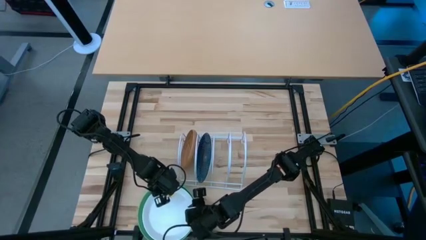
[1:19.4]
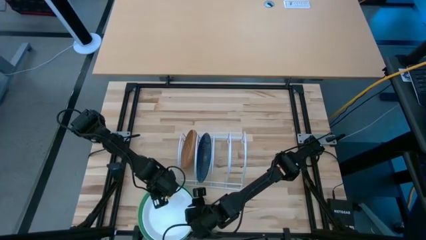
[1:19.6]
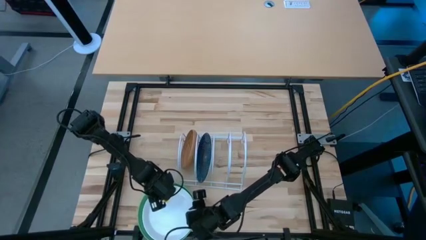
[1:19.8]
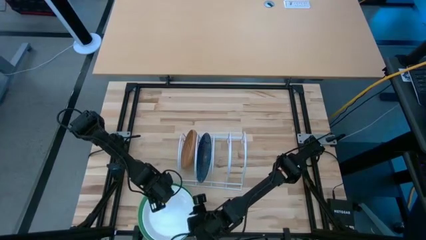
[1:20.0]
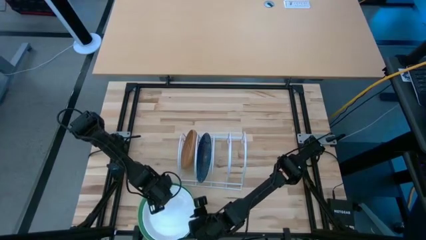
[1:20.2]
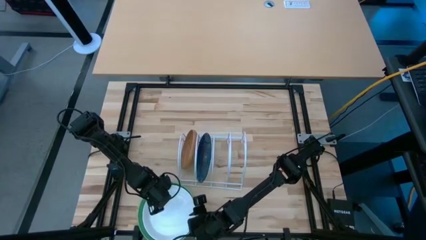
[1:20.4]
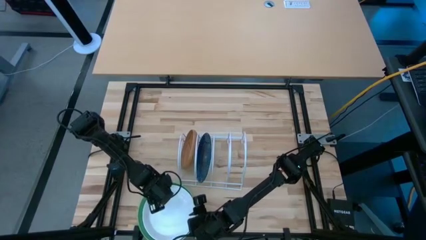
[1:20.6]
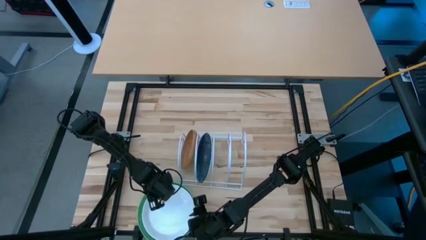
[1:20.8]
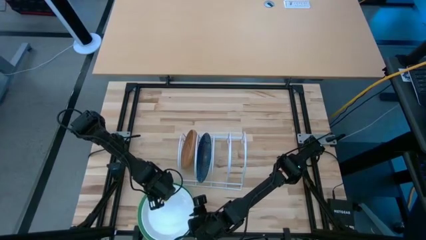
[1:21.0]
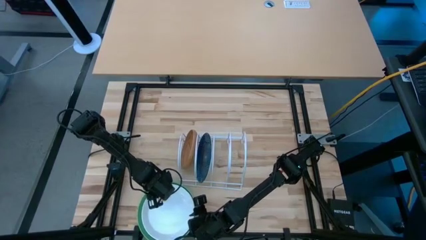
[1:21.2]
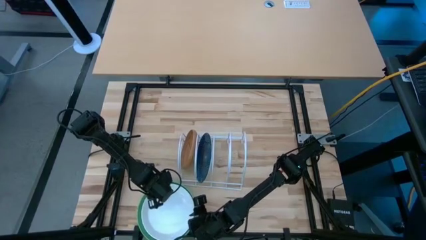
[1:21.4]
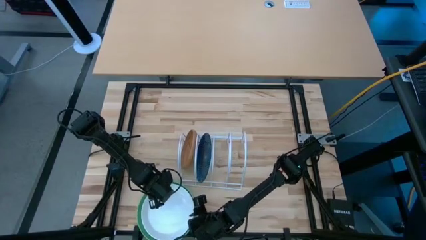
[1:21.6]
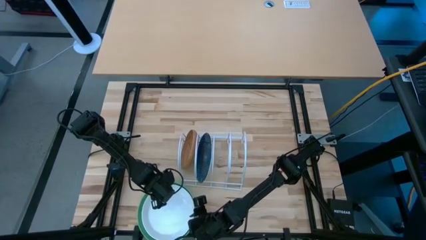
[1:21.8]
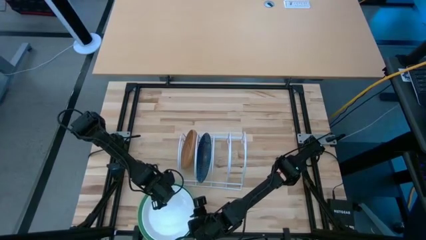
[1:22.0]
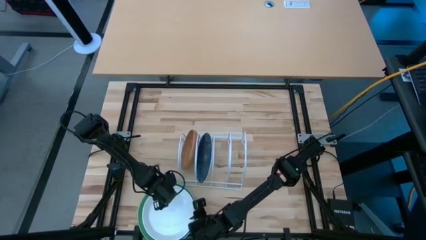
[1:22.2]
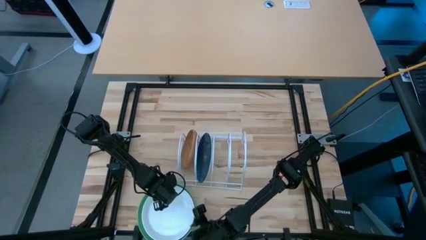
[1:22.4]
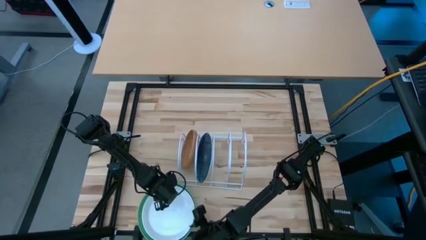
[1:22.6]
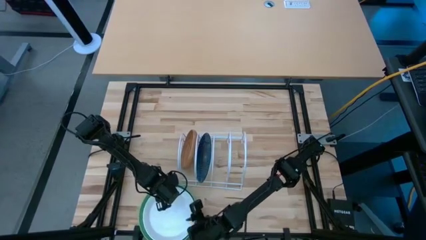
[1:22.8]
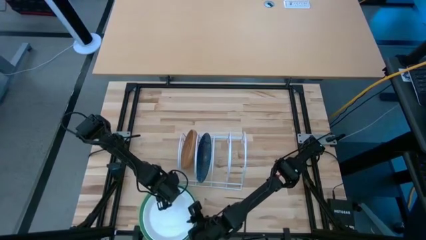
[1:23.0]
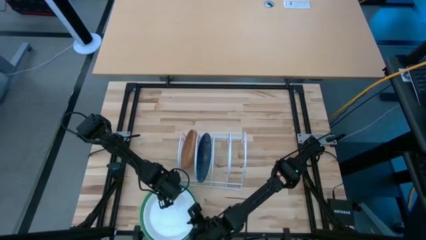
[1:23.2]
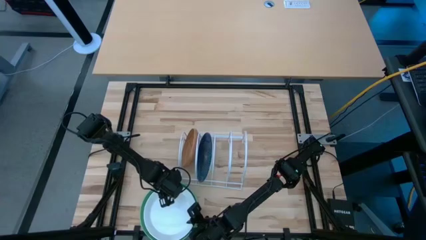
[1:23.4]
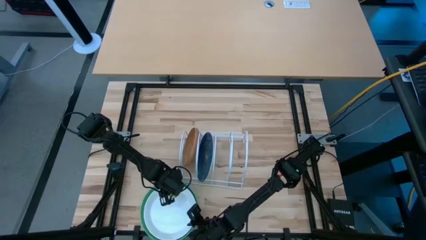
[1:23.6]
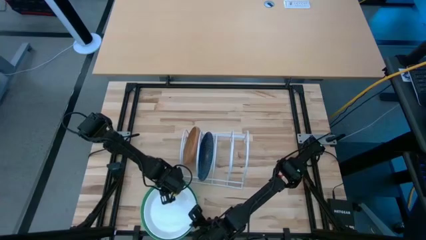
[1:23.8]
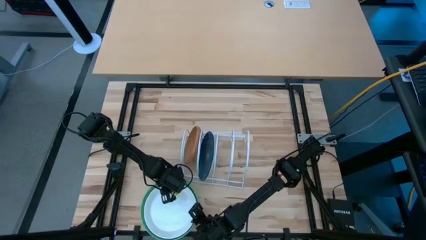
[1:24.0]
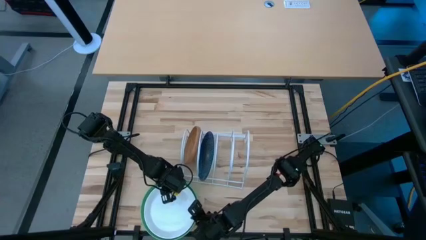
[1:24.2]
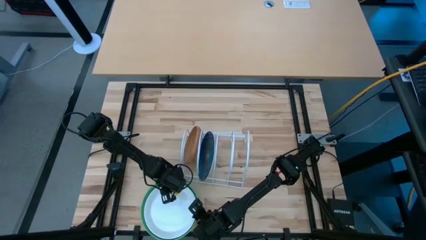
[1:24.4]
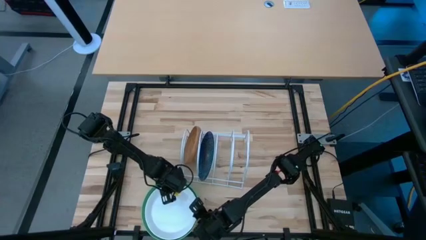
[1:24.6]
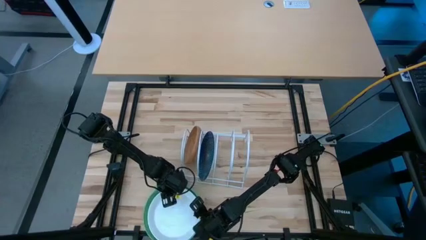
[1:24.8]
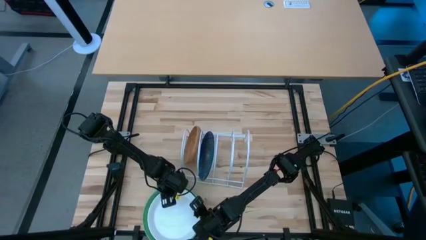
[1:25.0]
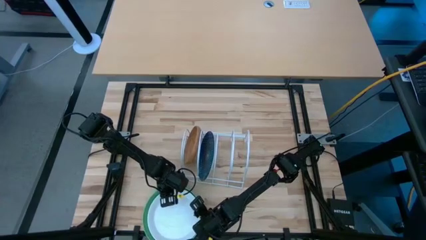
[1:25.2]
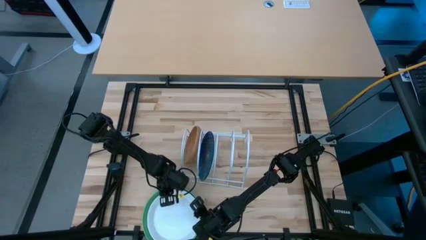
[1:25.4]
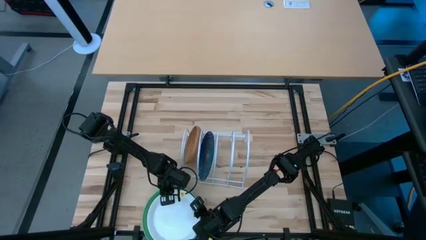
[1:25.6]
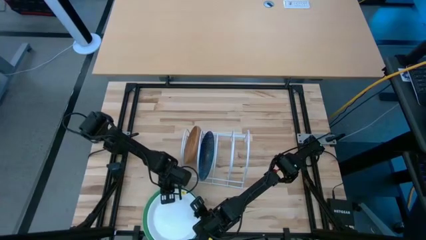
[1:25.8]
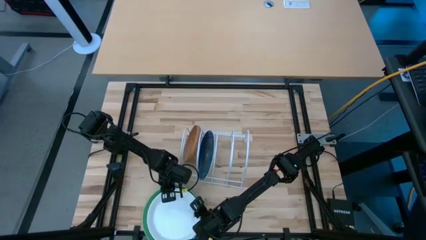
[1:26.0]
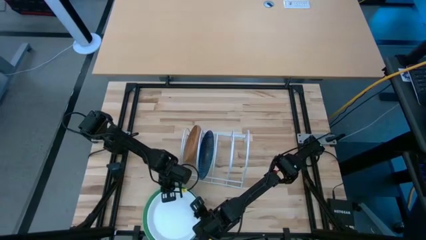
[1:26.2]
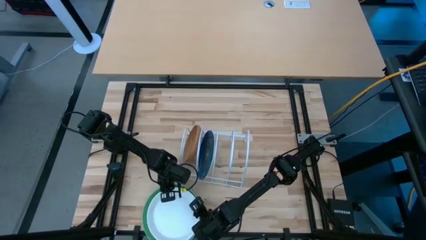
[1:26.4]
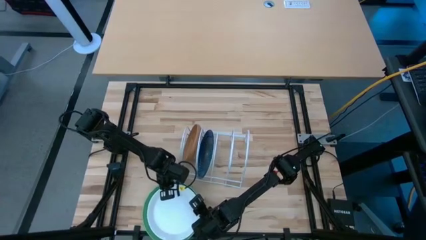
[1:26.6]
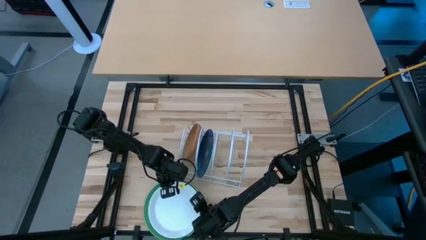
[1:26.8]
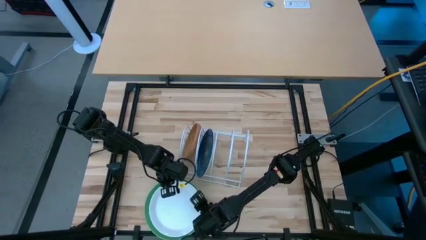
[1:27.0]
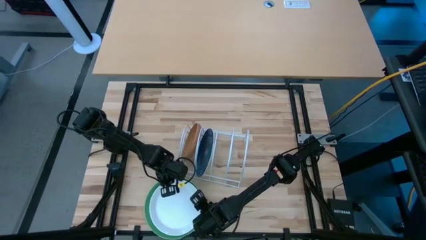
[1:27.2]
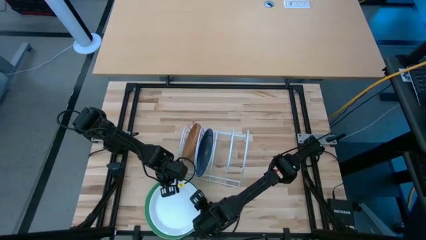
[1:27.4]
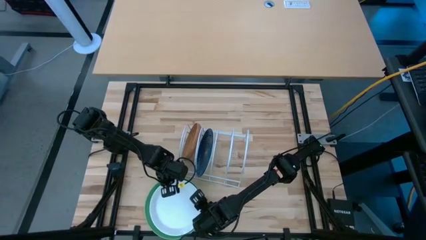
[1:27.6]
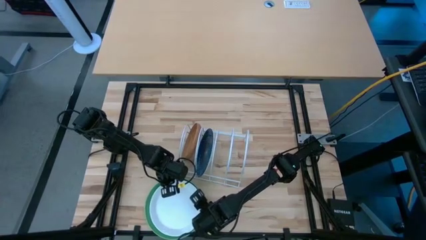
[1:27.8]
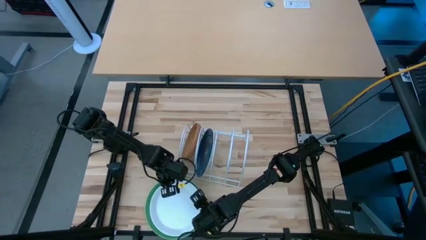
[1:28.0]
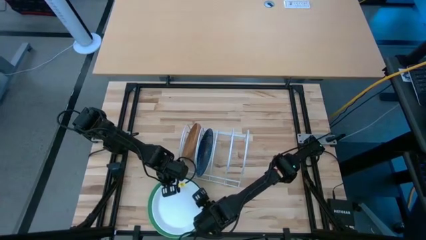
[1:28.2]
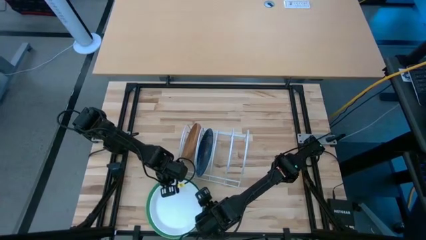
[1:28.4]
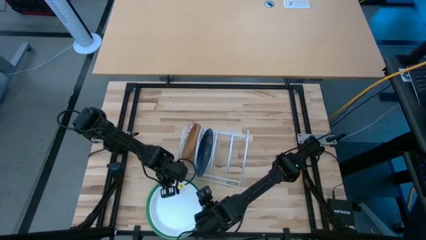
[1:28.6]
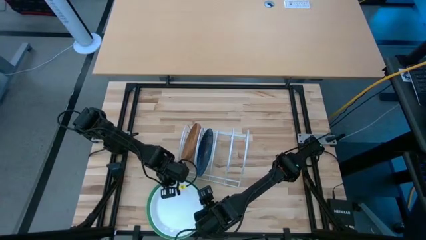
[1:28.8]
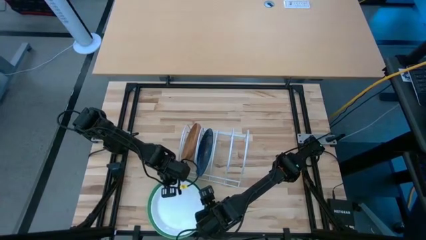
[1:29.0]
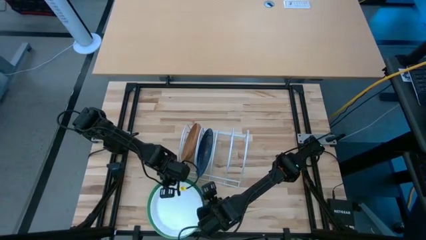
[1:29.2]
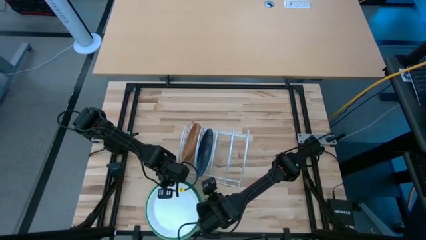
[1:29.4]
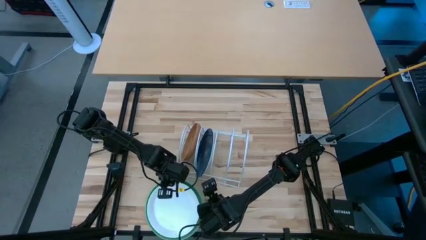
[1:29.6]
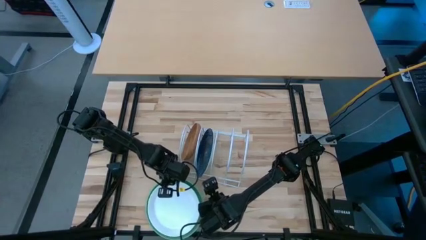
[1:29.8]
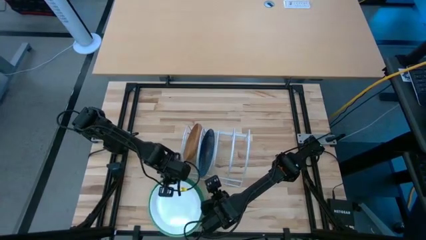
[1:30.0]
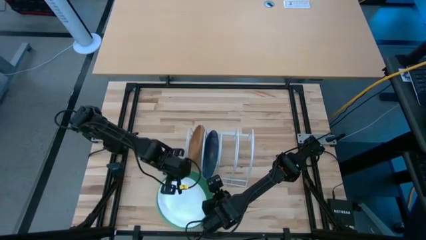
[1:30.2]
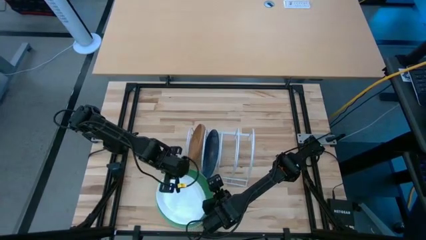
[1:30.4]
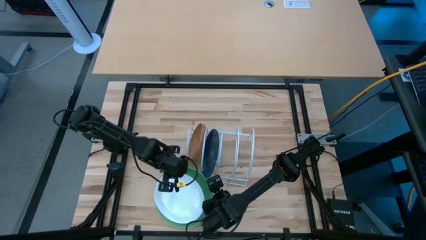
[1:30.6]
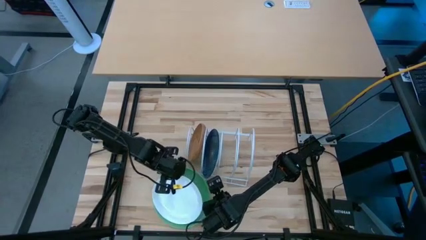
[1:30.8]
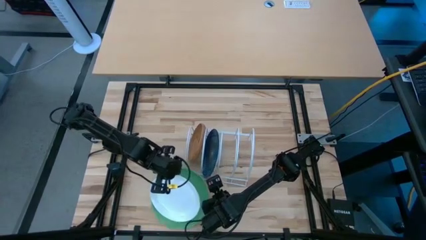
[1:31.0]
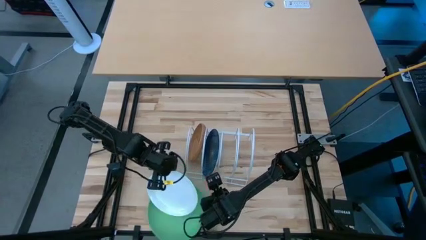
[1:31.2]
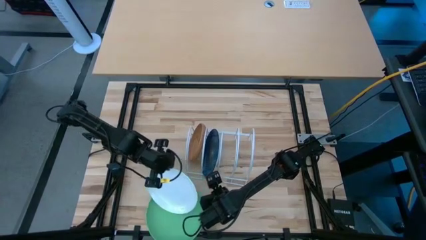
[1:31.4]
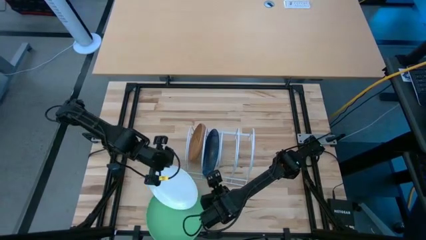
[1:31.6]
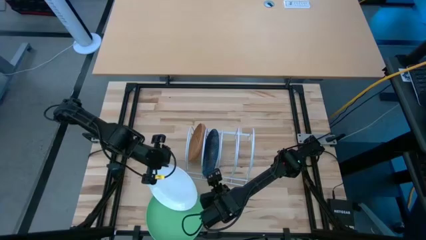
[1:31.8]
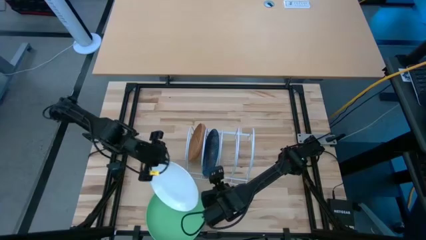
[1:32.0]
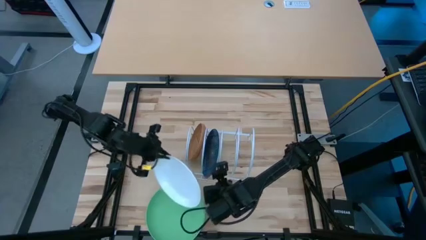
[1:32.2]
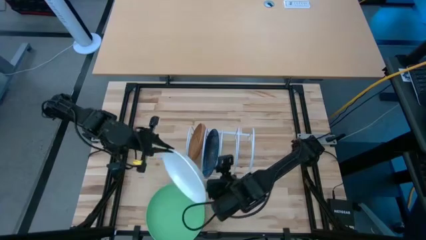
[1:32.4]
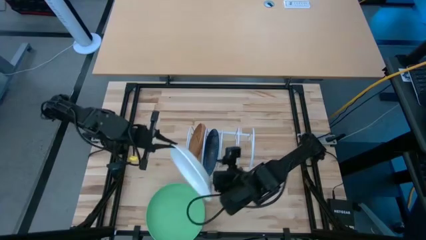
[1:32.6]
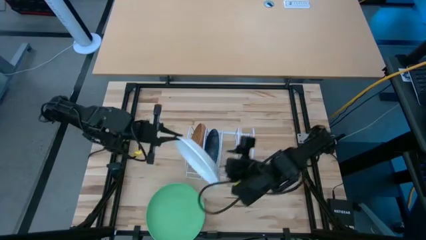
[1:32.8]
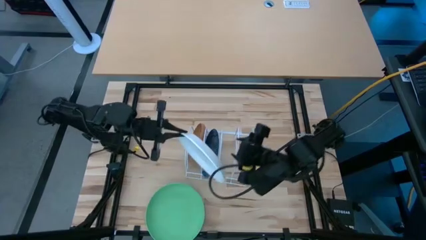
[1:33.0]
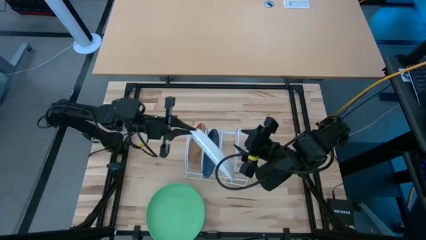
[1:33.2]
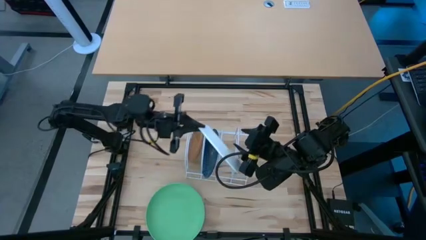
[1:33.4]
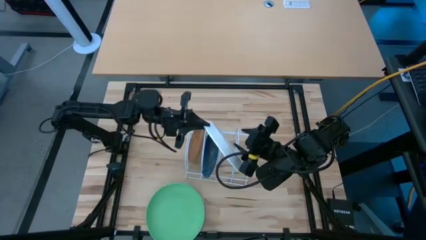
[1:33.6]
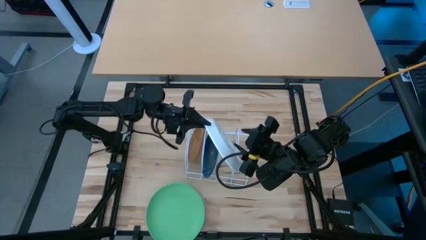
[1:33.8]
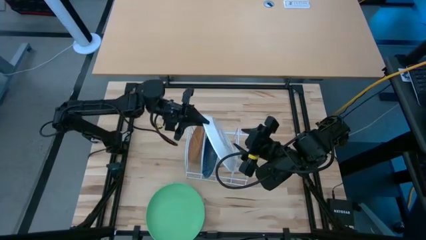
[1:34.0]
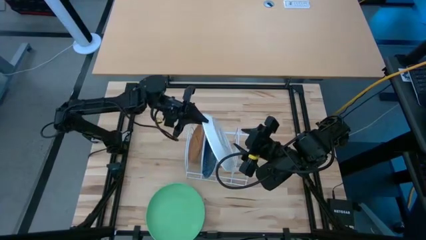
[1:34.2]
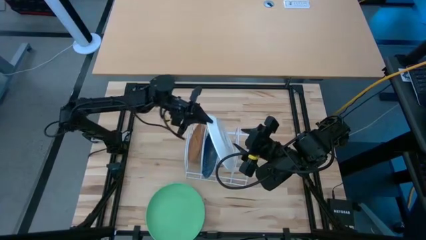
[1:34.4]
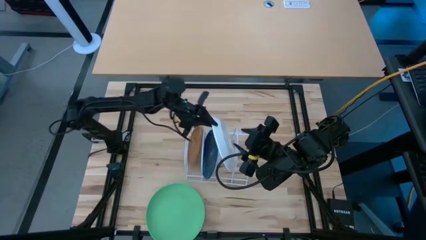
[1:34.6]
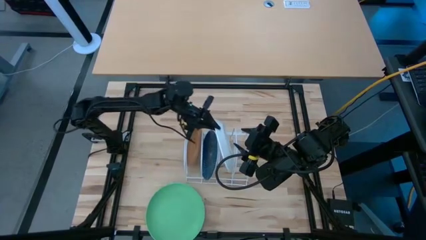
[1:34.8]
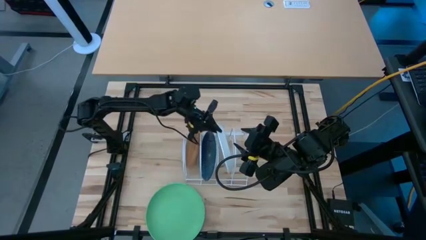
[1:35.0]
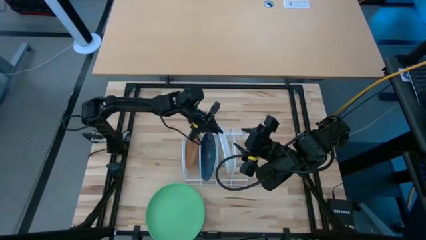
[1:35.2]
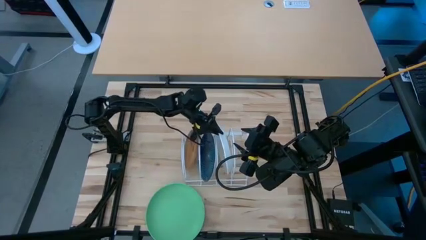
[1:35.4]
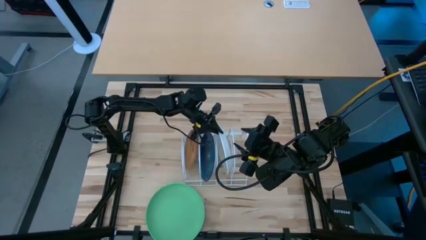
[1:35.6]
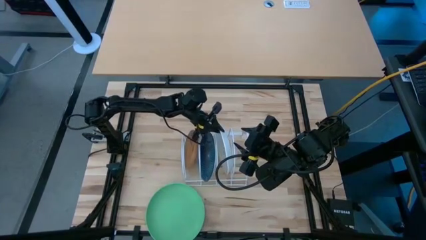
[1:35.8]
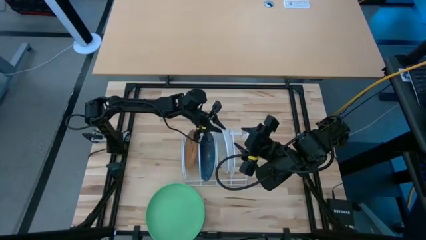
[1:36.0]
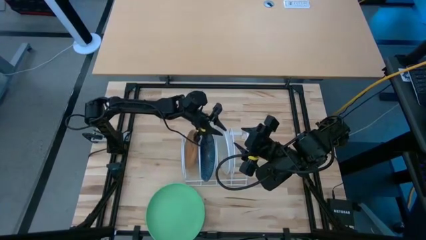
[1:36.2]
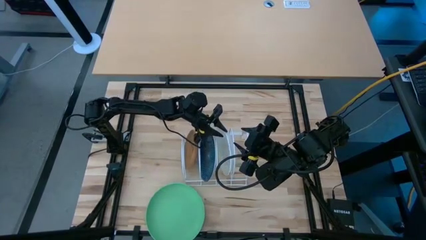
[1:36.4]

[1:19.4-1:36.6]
Task: Sort dishes
Put the white plate into the dish rack
